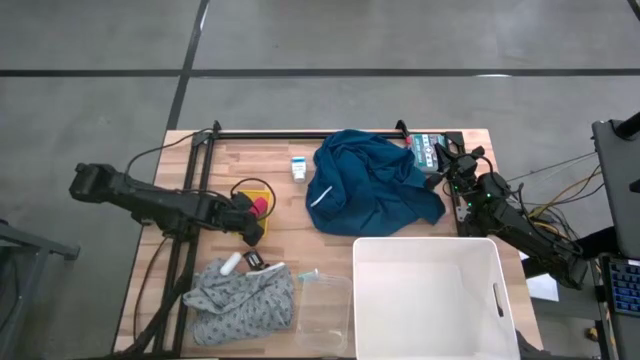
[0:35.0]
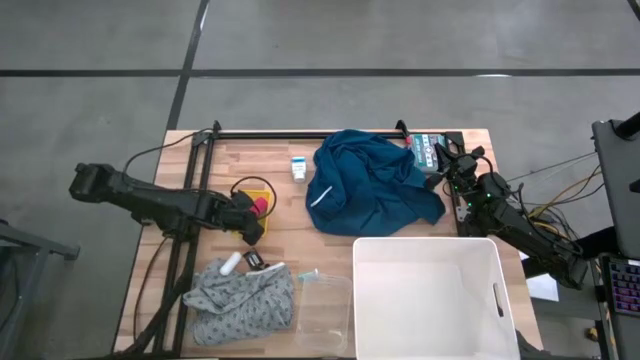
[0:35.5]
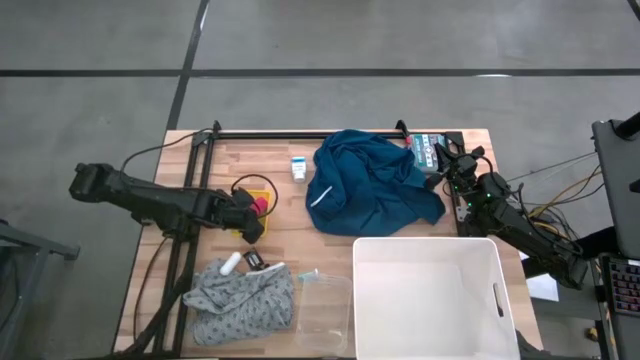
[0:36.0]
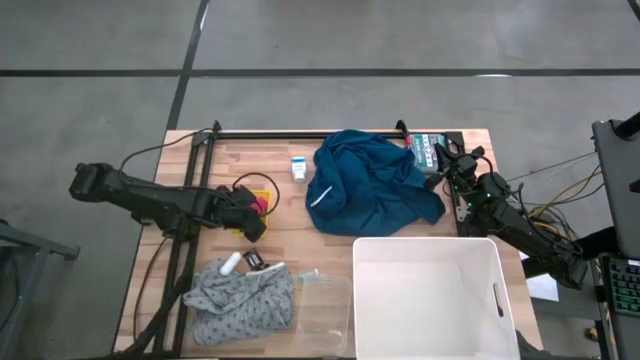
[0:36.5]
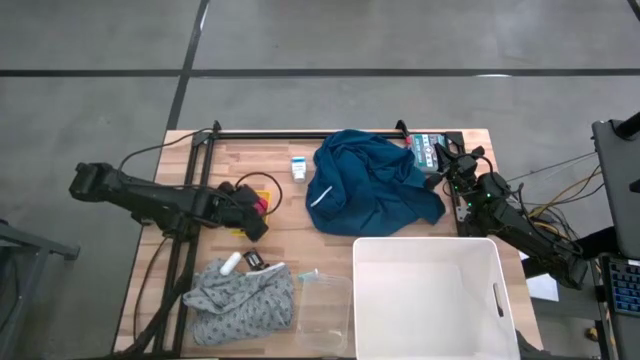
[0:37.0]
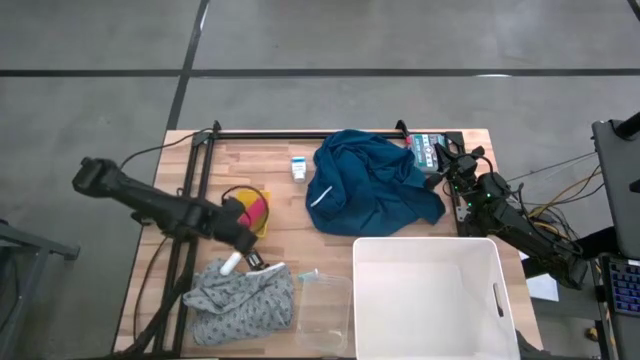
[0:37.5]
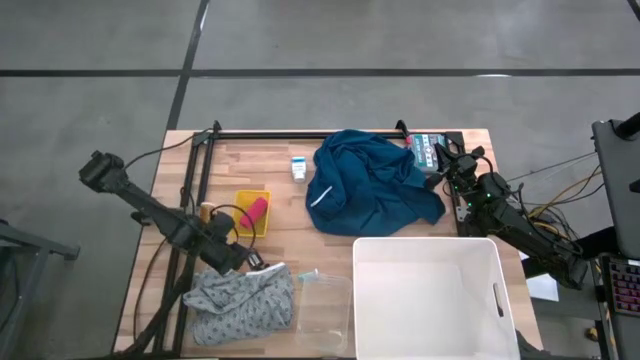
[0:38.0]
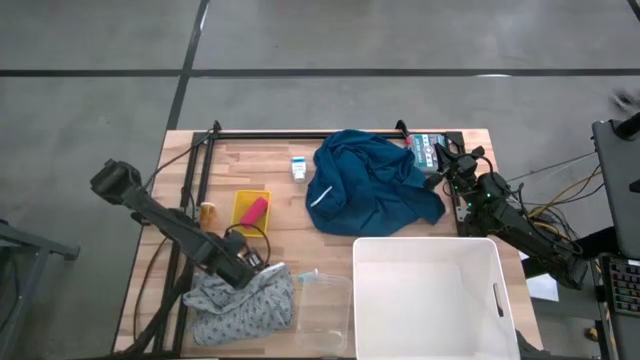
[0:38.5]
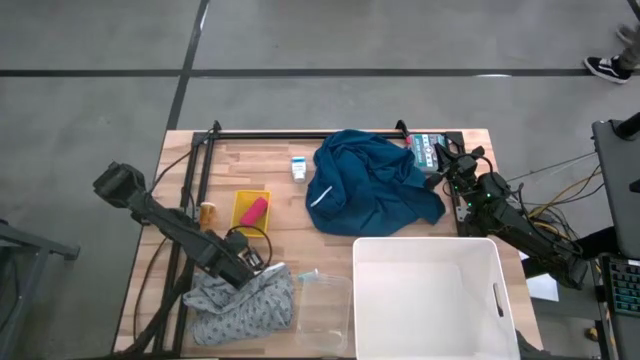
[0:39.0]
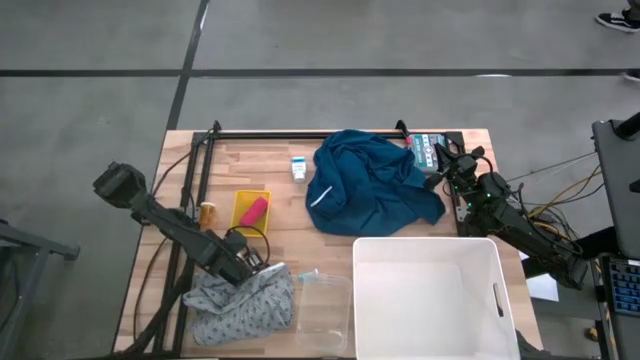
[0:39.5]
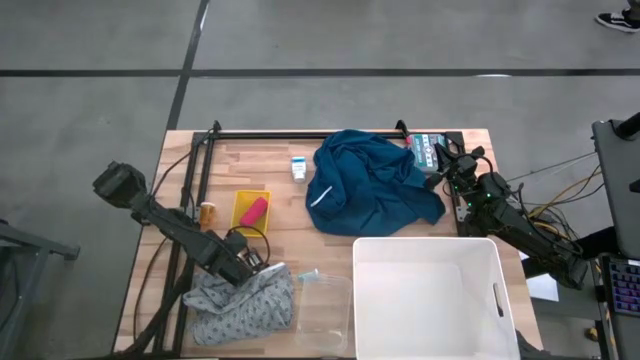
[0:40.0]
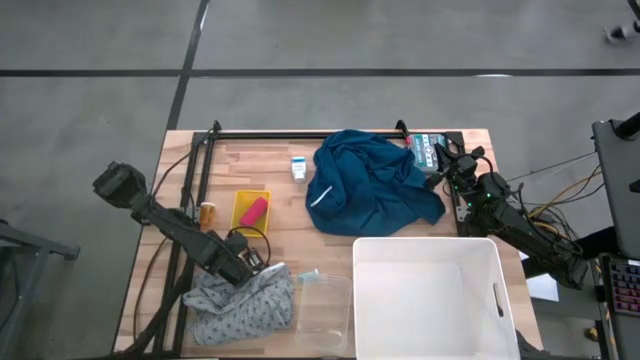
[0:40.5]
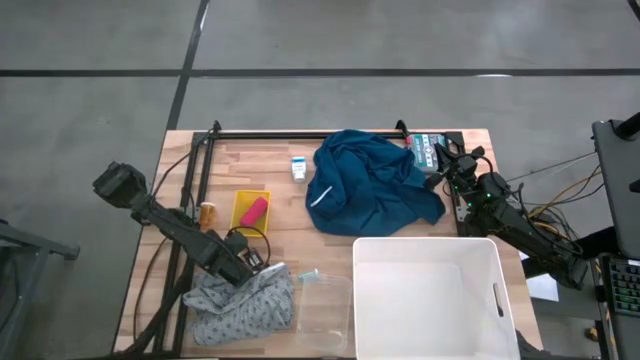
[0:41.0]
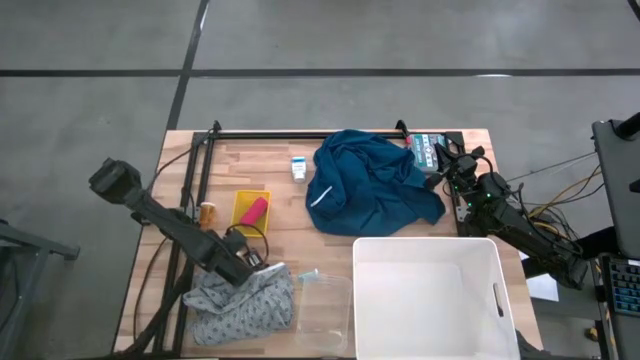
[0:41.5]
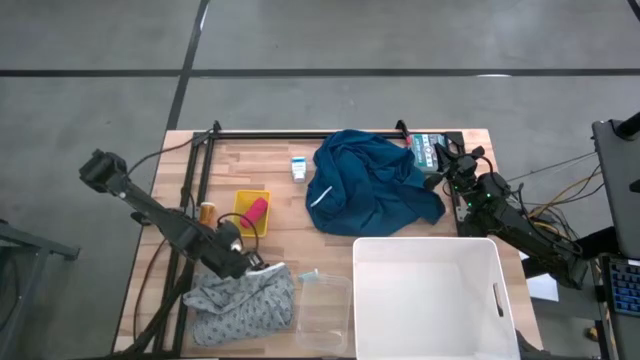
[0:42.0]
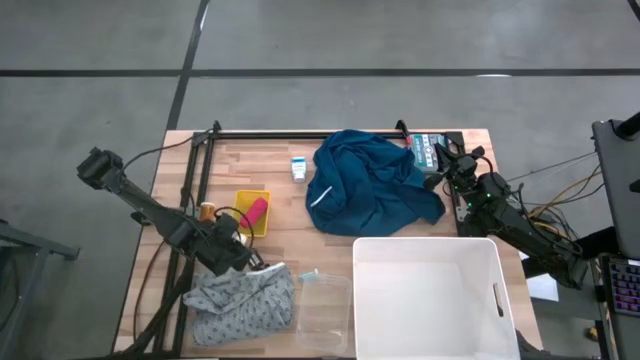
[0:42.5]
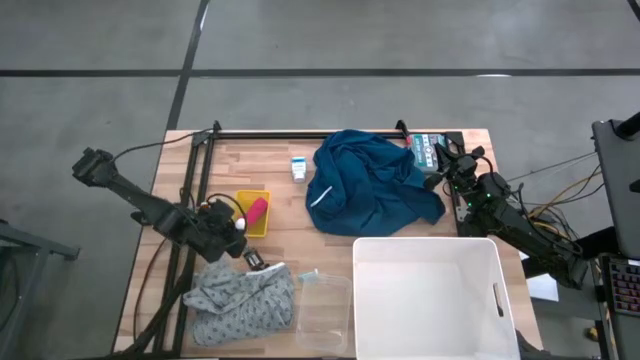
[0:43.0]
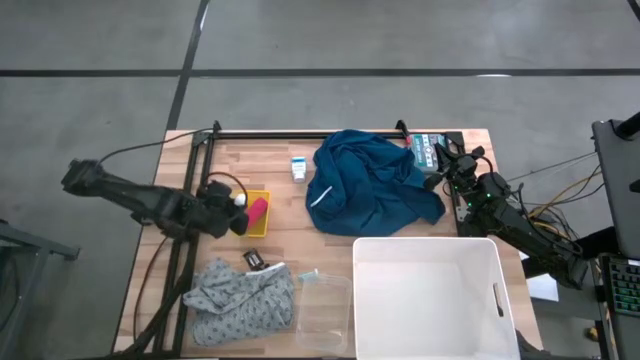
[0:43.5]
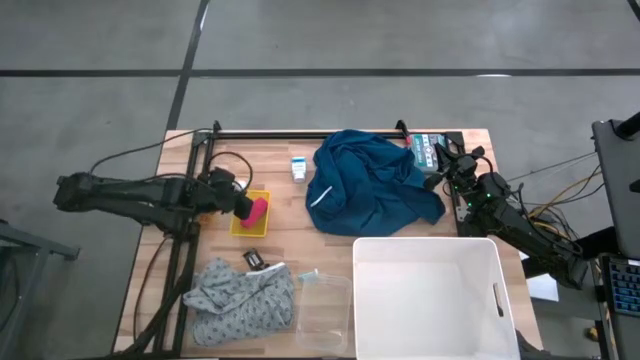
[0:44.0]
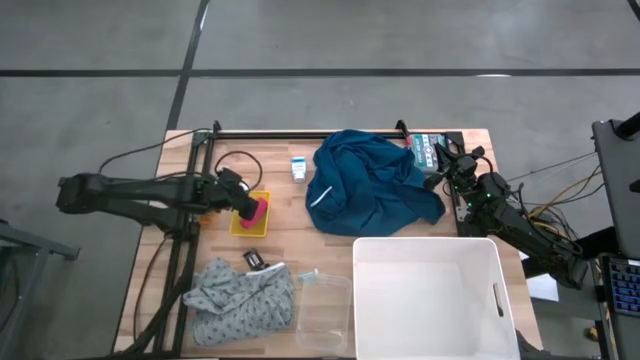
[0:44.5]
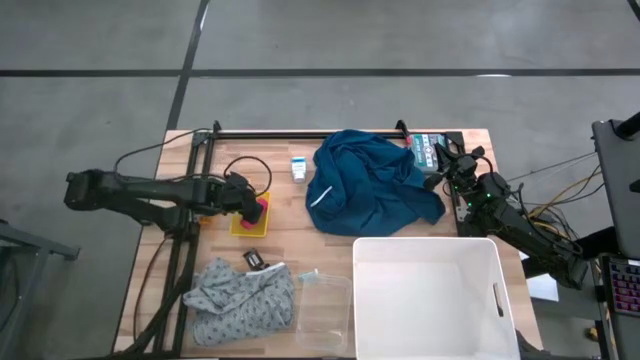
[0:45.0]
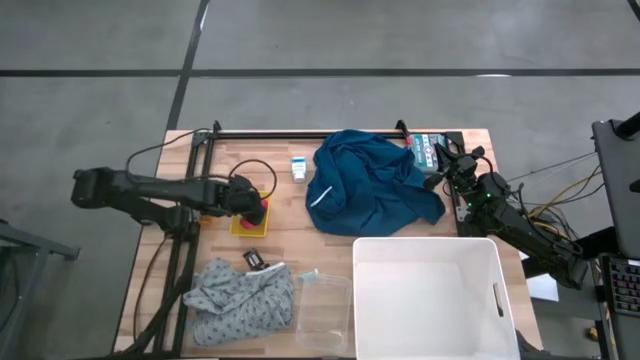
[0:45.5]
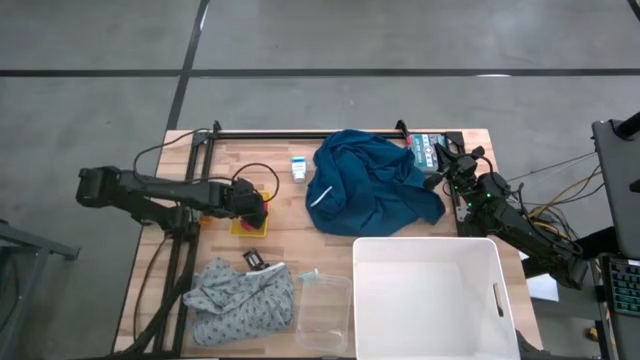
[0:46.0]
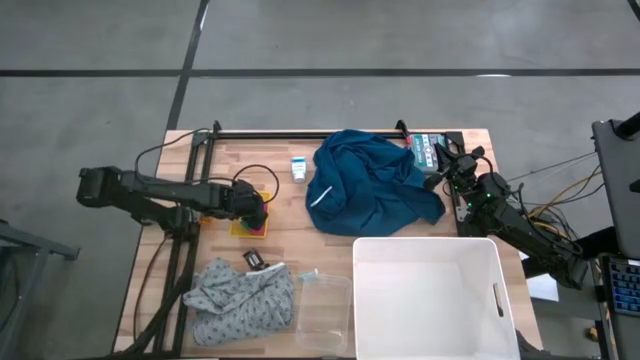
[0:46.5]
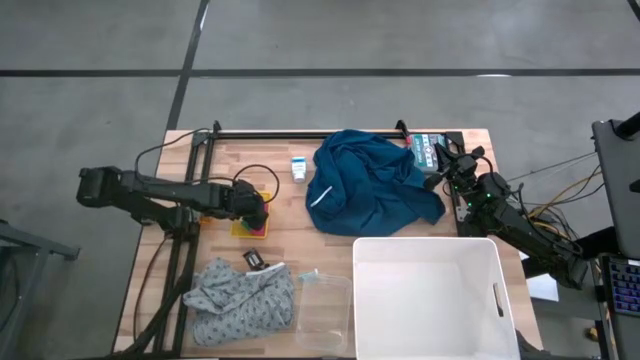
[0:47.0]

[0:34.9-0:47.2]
Task: Pick & Place Medicine items
Put the white rolled bandage into the yellow bin

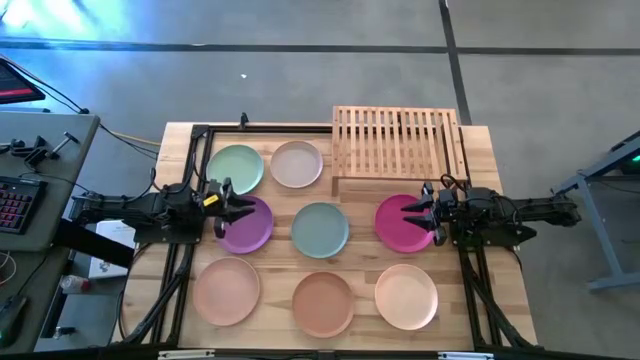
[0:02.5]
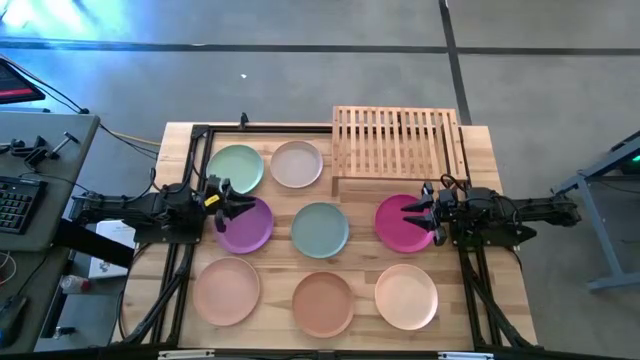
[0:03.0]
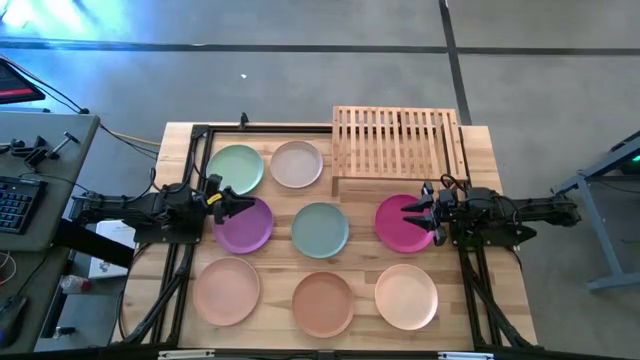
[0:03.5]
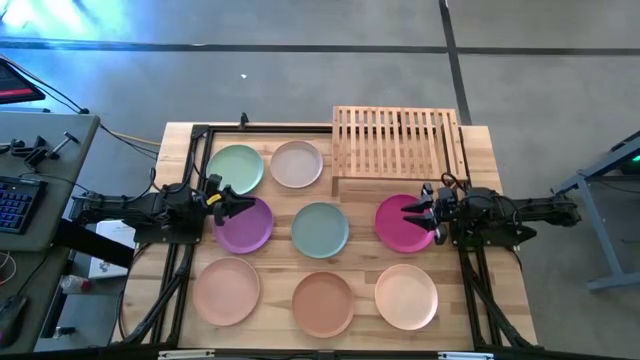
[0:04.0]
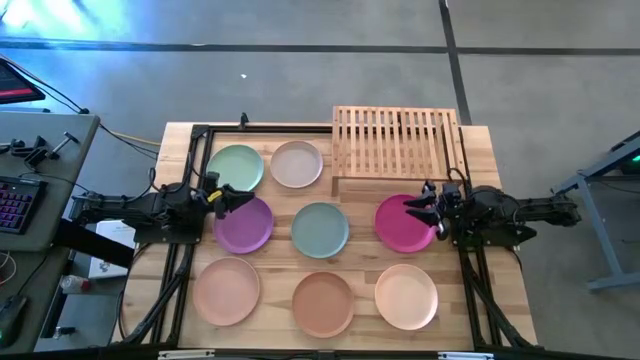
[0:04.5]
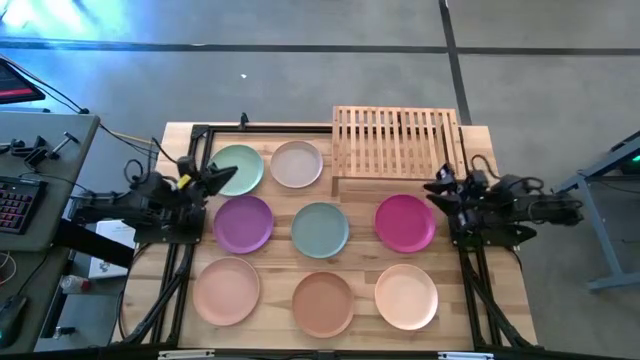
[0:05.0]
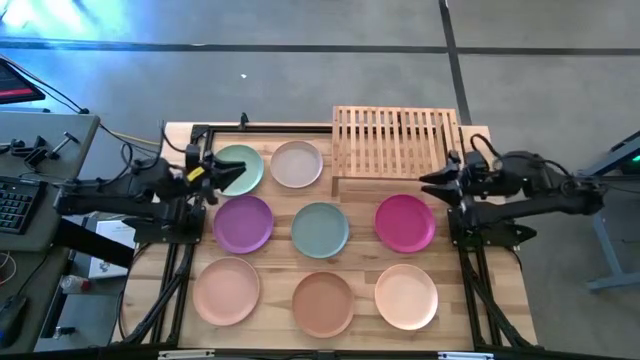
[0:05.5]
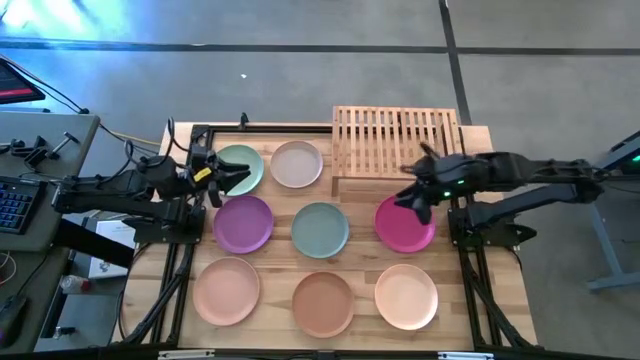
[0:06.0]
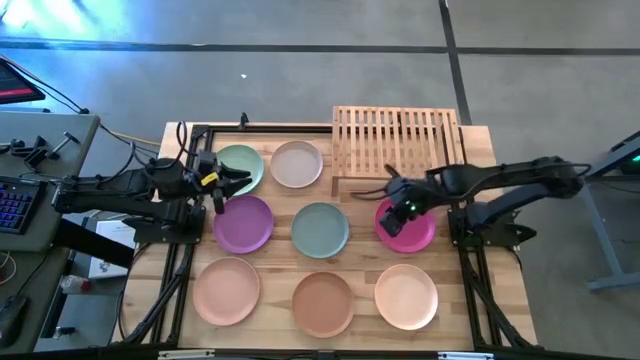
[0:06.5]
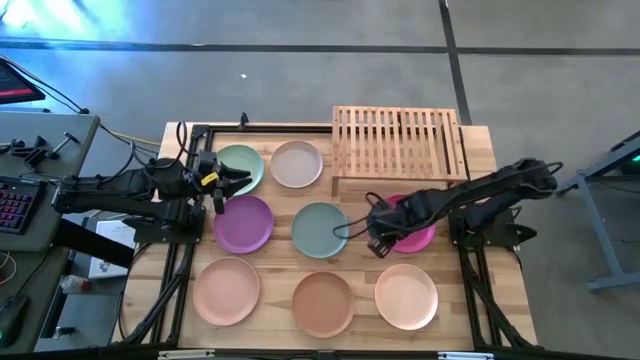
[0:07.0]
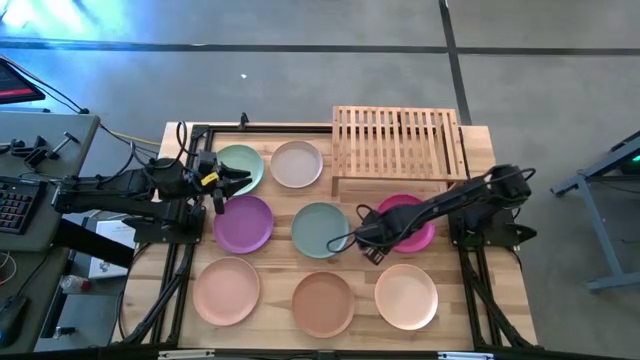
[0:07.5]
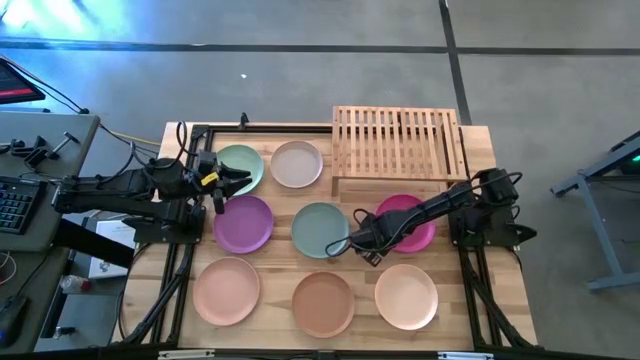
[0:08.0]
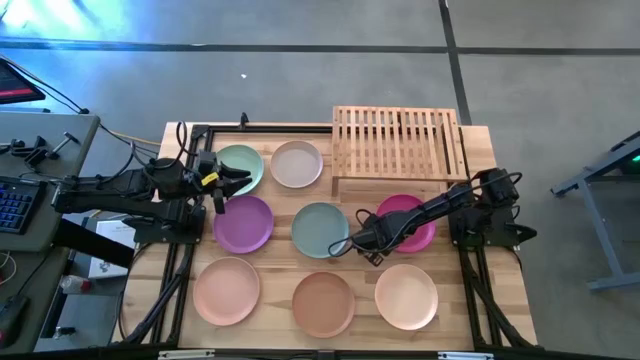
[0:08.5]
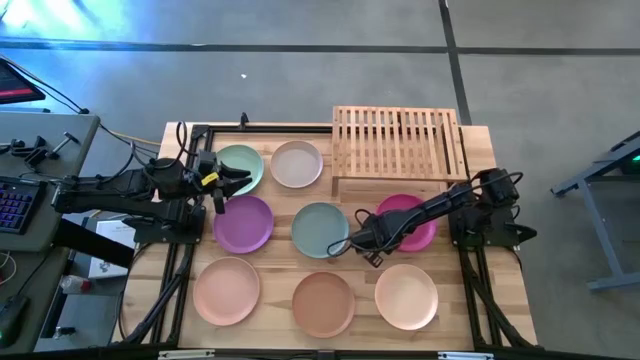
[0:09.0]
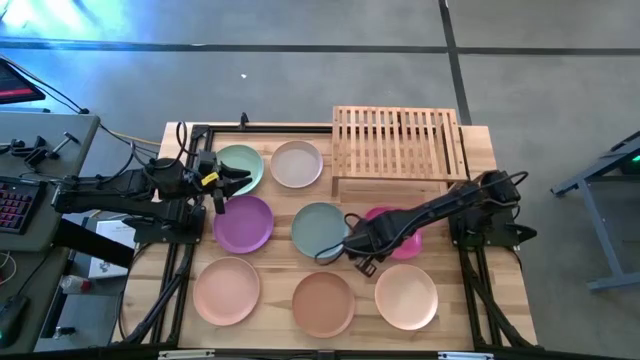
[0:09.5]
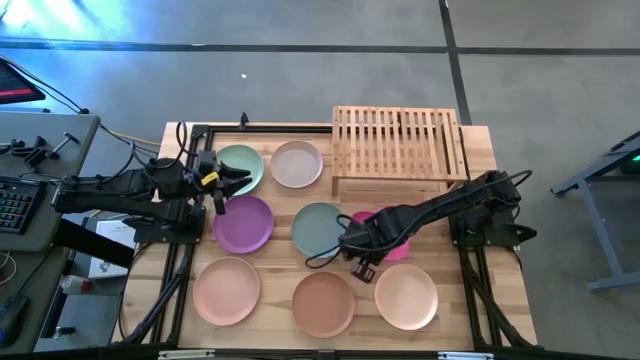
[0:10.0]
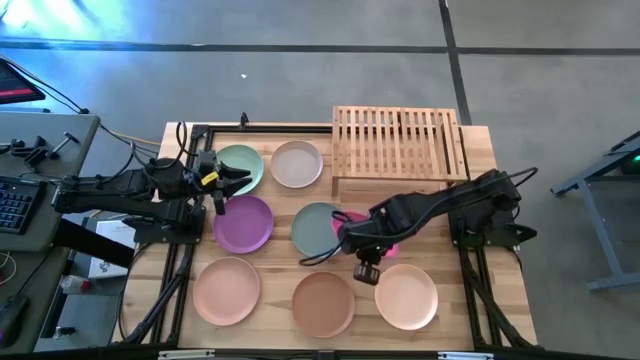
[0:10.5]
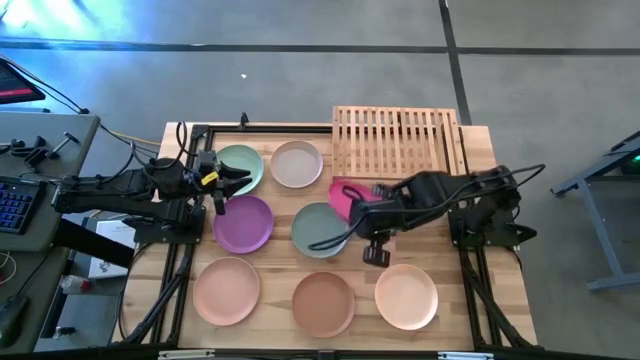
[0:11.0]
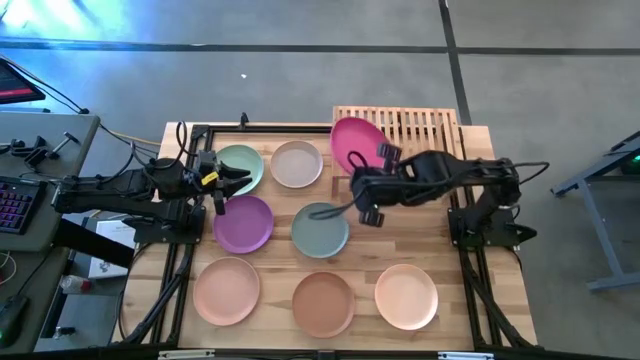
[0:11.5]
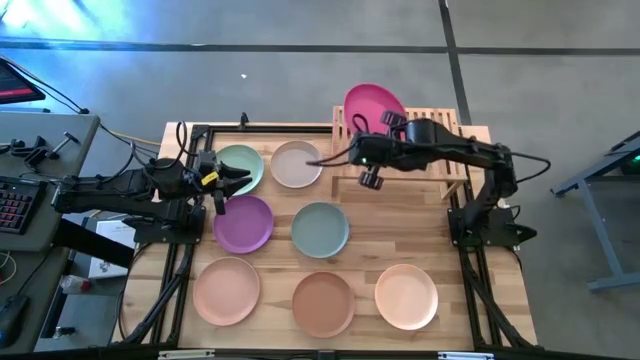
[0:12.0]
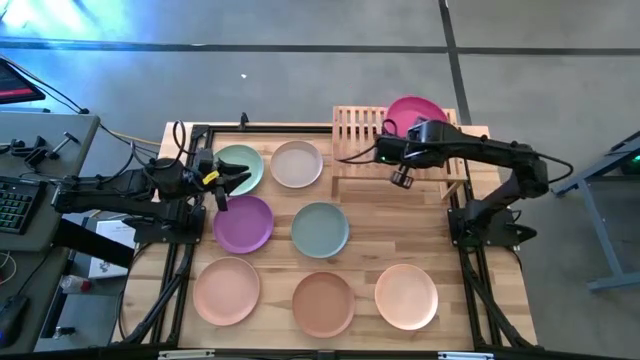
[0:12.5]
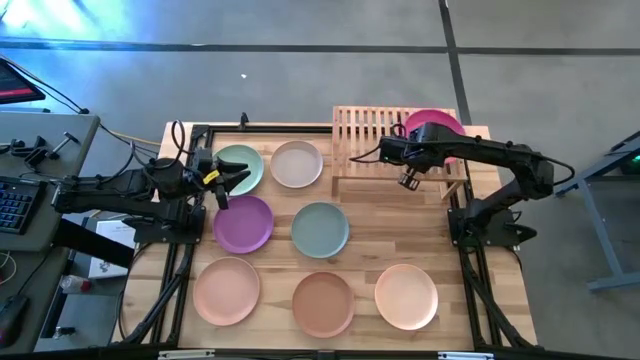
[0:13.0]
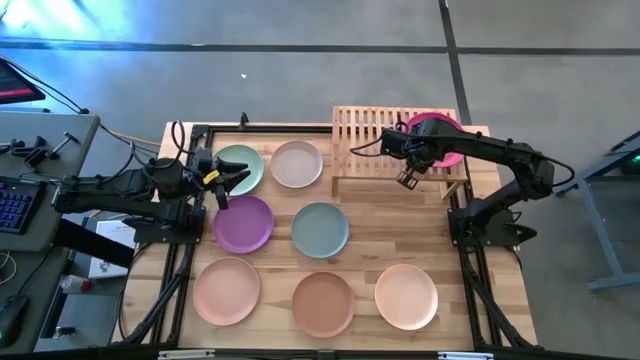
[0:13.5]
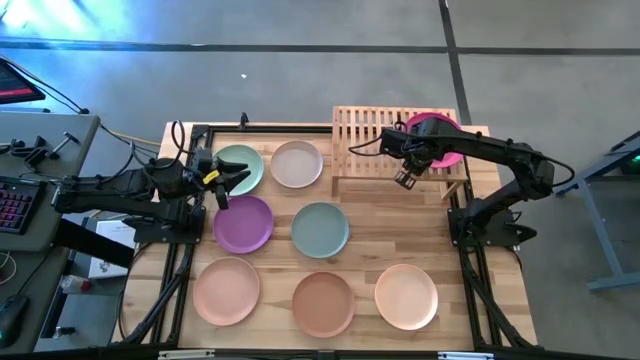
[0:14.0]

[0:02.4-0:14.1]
Task: Place and stack plates onto a shelf
Put the pink plate on the shelf
